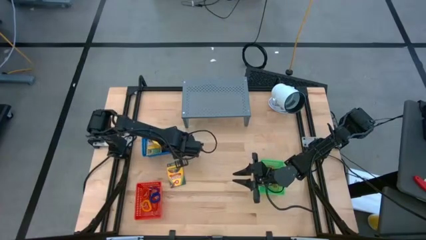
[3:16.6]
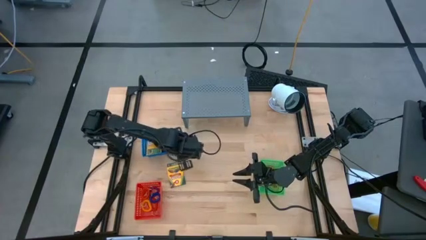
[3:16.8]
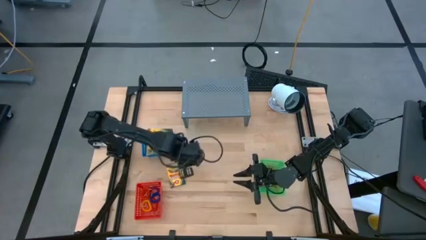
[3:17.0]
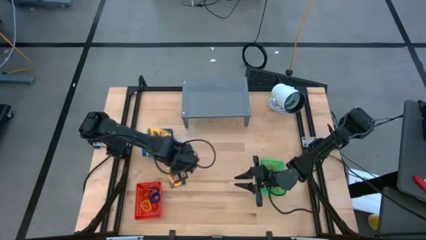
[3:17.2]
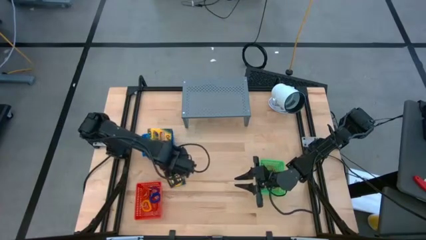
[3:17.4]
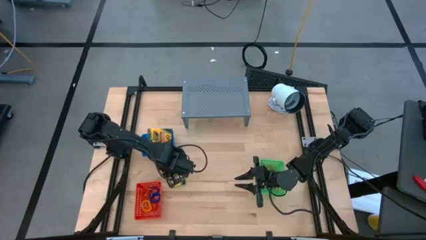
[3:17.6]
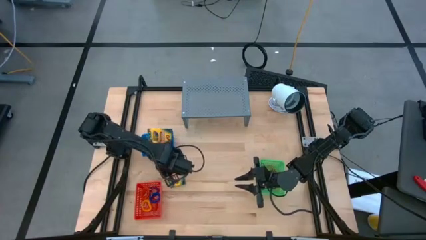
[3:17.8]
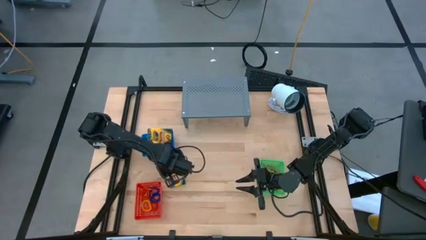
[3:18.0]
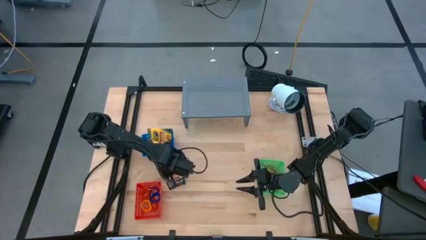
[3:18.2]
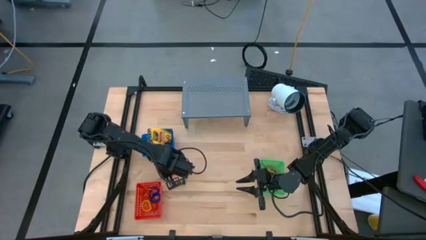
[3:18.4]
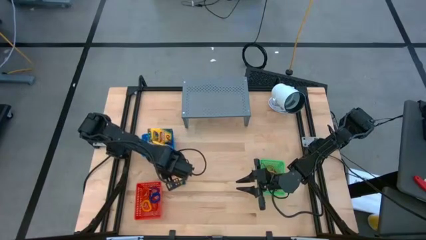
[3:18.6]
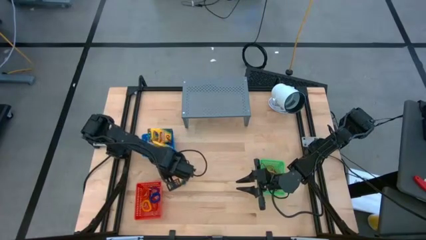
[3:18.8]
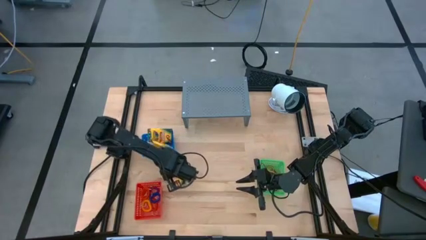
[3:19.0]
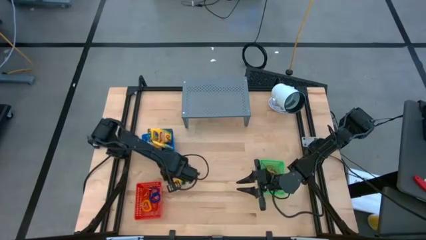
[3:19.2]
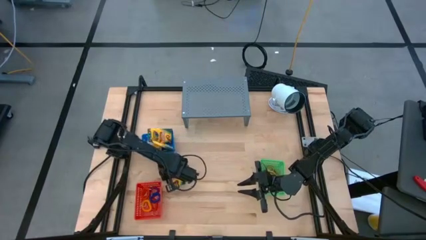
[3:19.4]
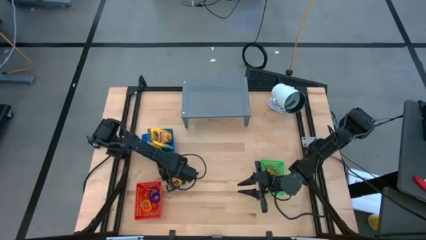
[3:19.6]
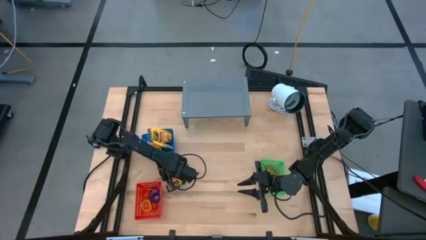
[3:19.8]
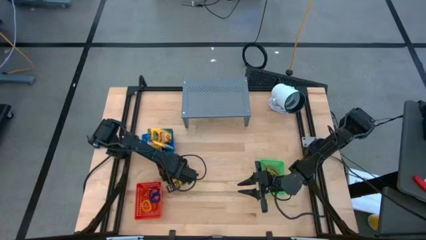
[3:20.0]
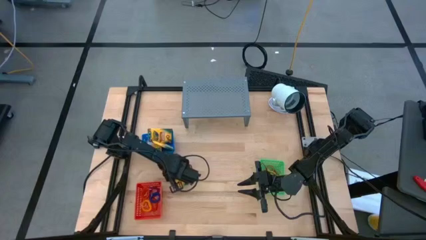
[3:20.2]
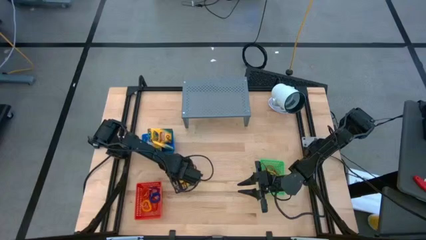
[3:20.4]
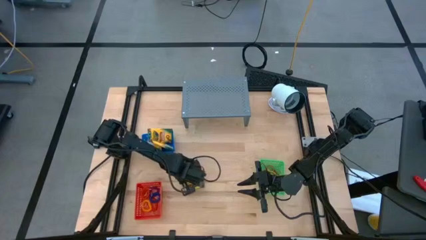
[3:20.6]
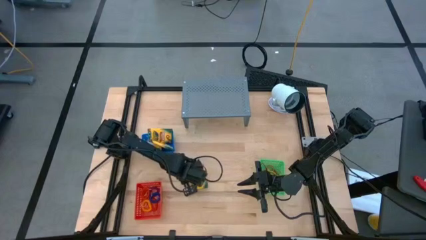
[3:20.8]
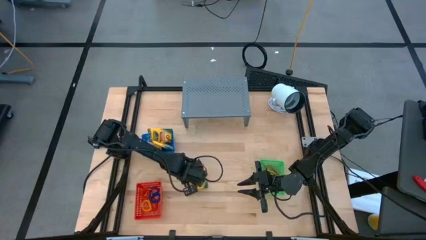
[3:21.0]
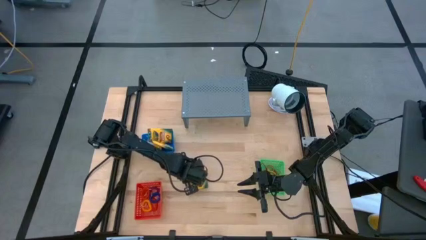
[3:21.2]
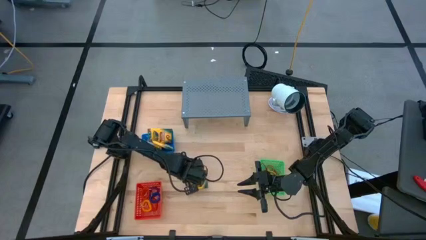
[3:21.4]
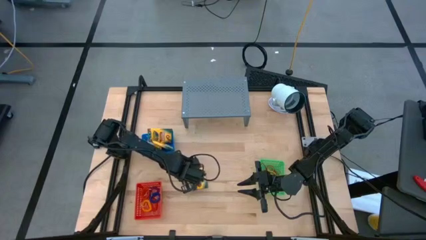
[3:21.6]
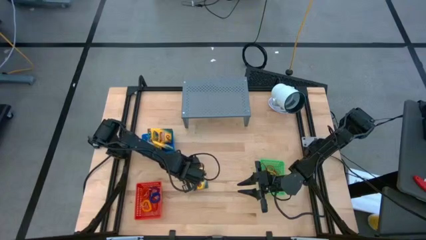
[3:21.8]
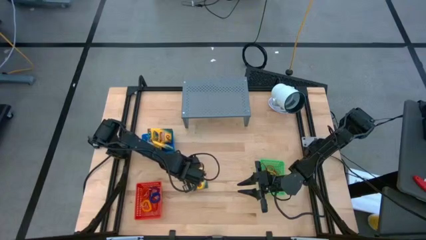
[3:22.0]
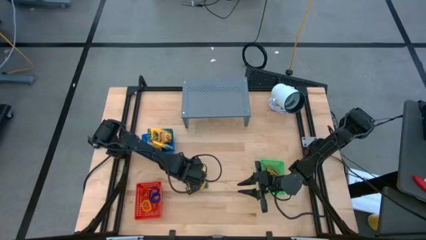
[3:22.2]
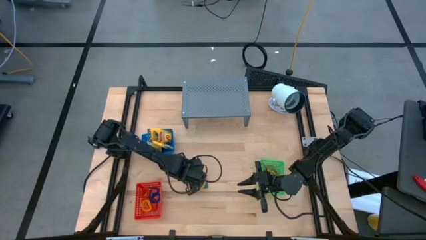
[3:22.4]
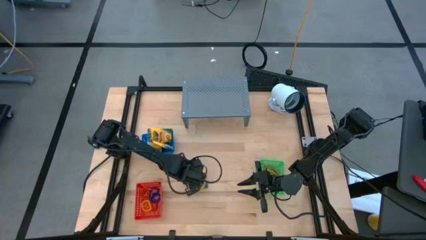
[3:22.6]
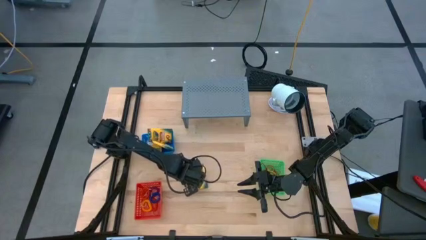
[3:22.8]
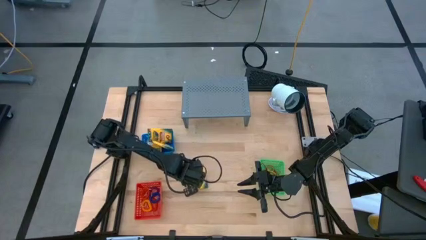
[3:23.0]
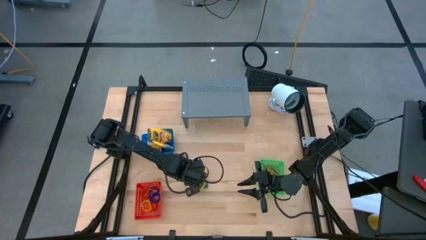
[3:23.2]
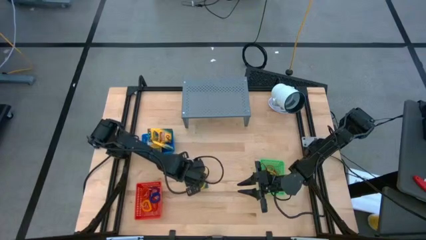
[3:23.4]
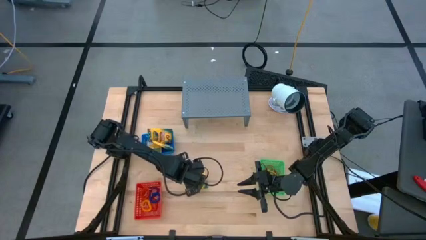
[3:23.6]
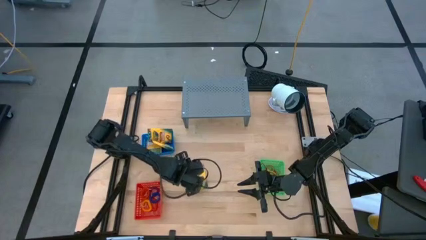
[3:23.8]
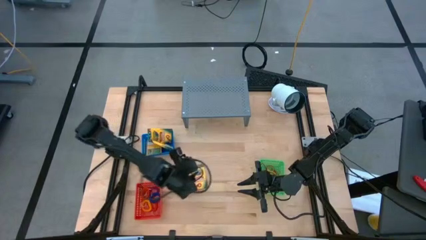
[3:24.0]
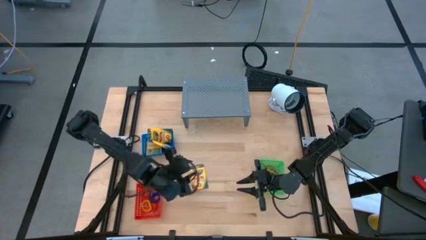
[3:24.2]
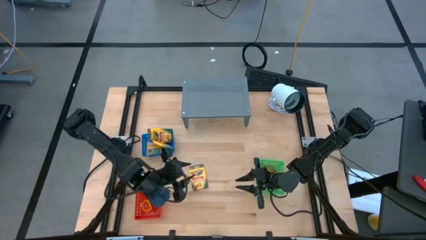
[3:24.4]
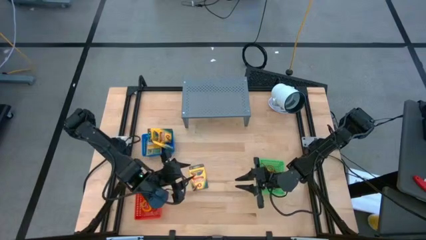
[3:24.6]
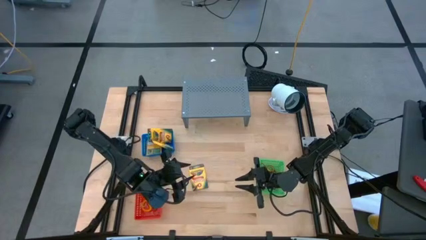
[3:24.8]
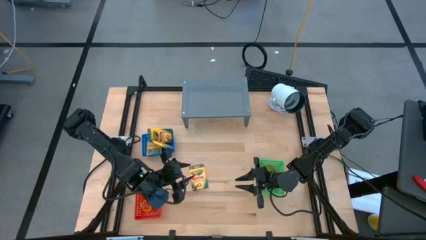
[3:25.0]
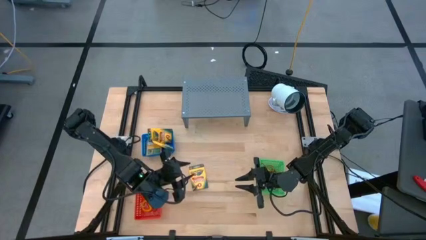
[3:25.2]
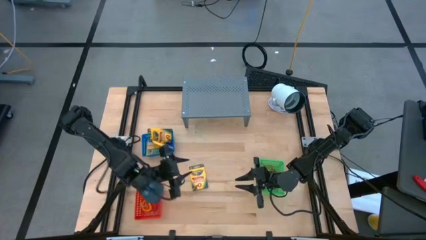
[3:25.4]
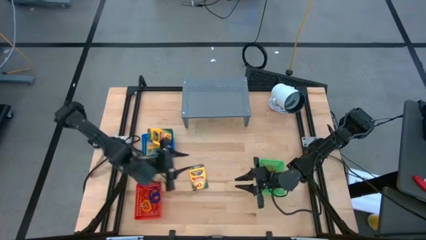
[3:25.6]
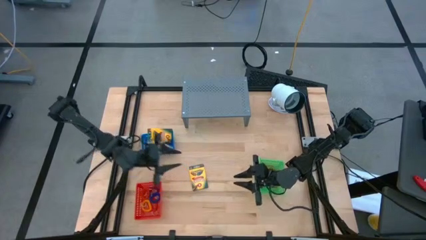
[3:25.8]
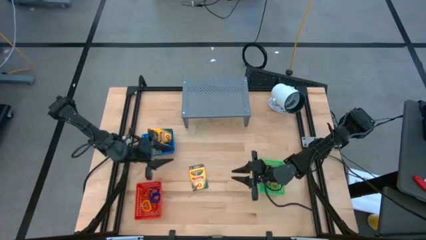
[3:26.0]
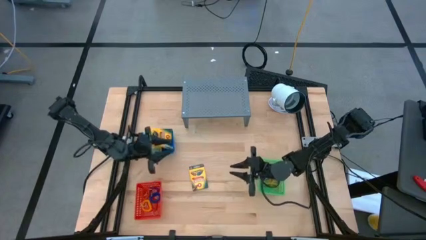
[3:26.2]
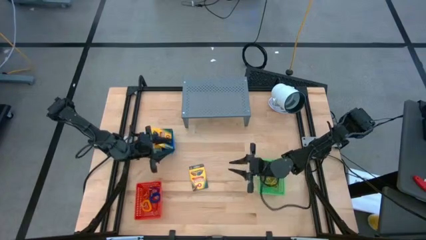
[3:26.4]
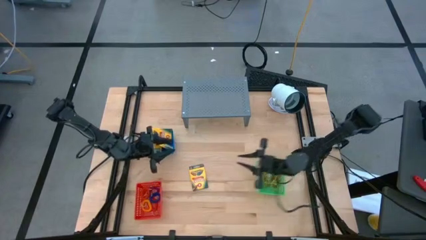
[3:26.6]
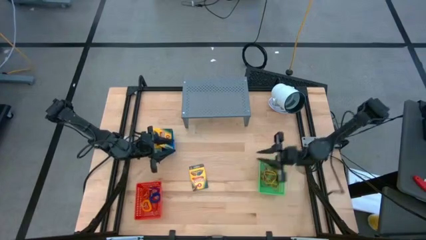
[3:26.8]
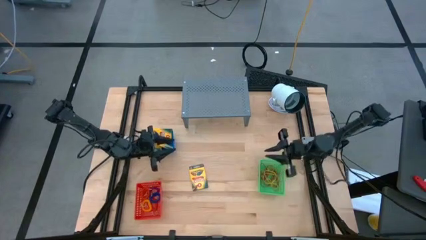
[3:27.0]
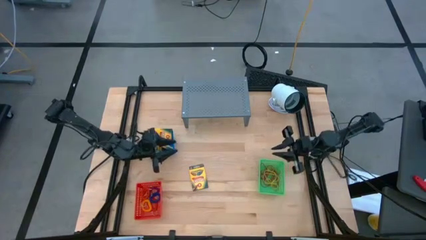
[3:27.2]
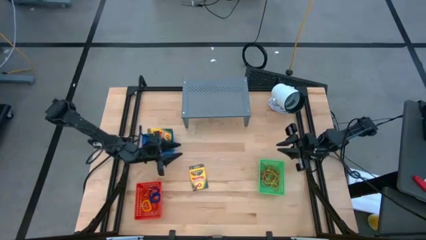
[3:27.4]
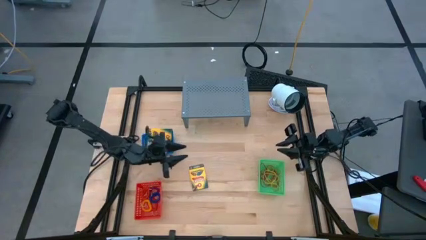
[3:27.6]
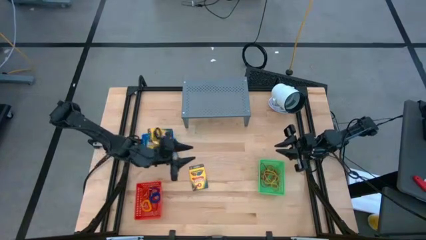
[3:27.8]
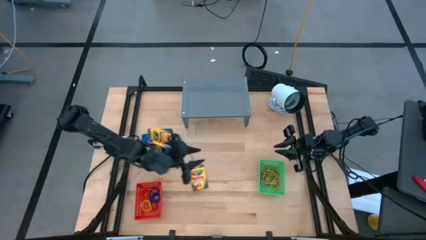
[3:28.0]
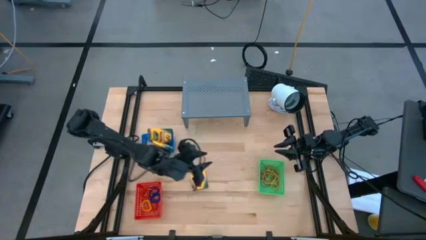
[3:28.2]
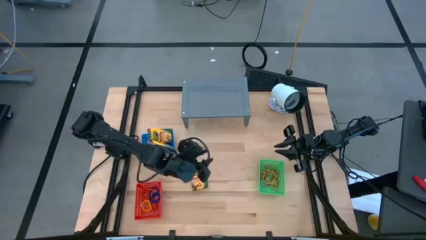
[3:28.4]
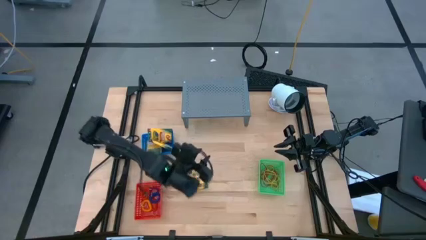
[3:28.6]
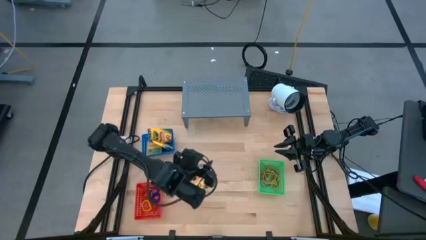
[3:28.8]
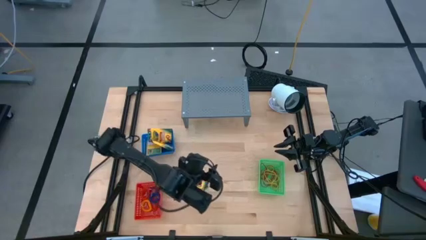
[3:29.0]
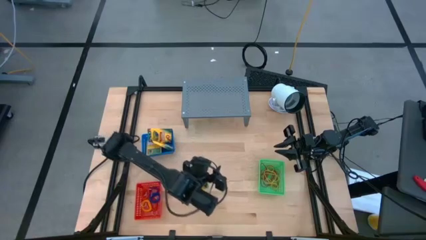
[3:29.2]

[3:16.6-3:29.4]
Task: Pick & Place Office Desk Supplies
Put the yellow crayon box into the blue bin

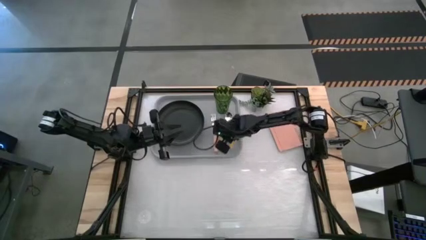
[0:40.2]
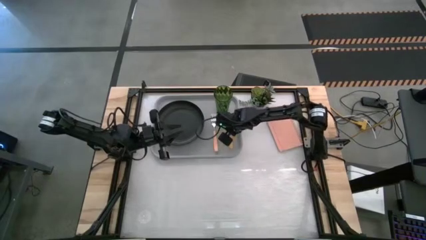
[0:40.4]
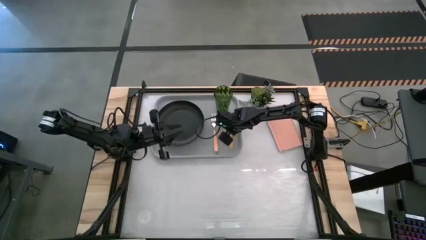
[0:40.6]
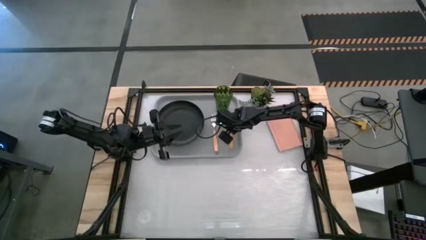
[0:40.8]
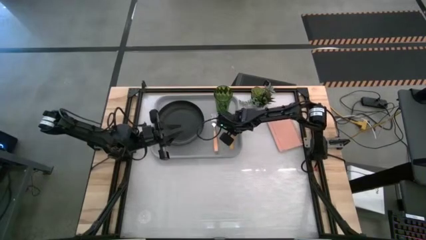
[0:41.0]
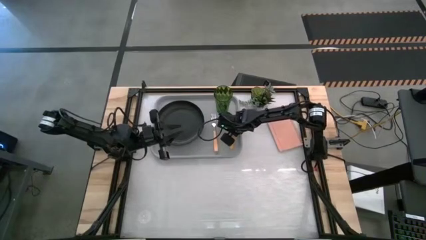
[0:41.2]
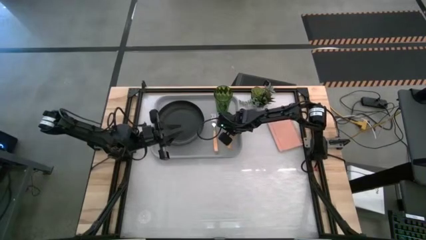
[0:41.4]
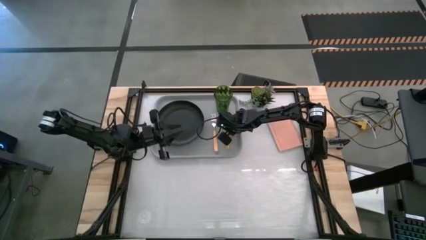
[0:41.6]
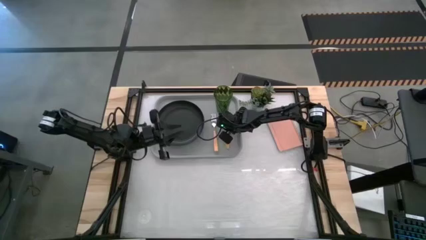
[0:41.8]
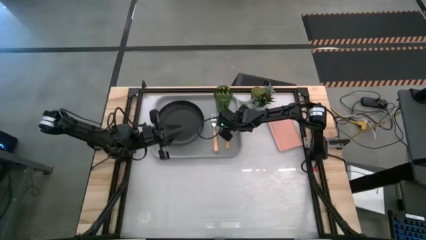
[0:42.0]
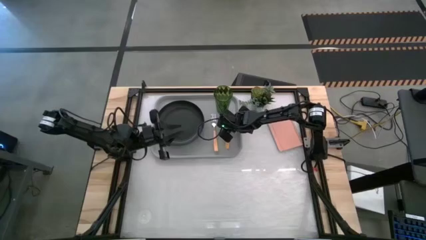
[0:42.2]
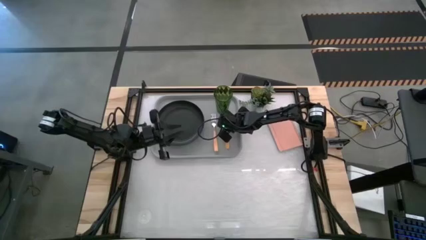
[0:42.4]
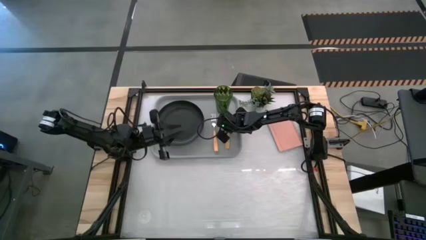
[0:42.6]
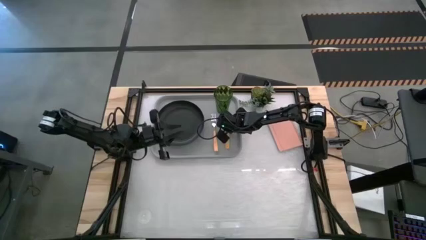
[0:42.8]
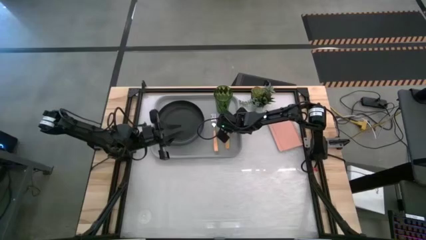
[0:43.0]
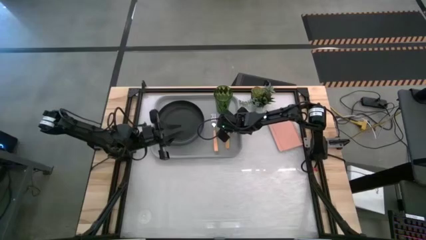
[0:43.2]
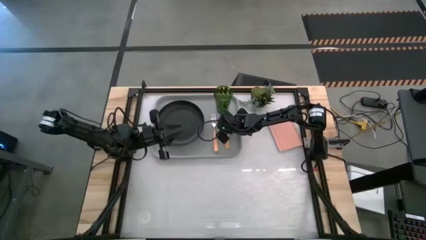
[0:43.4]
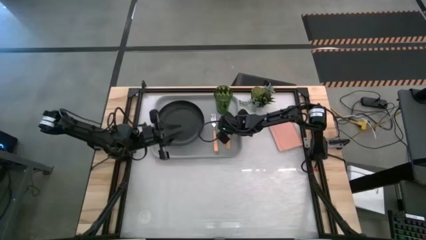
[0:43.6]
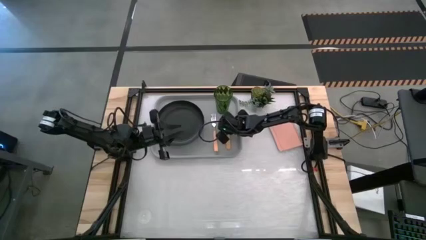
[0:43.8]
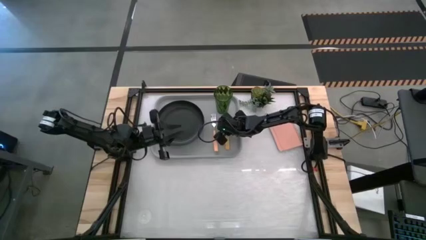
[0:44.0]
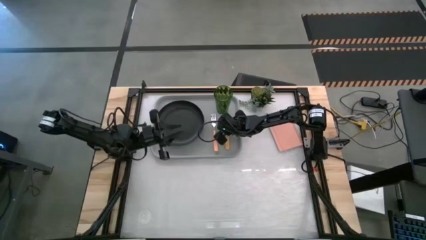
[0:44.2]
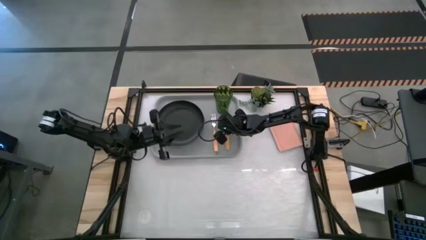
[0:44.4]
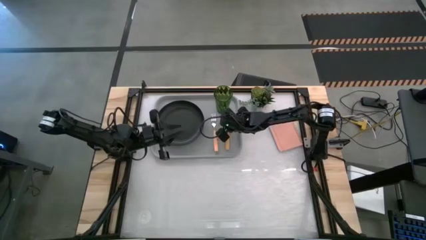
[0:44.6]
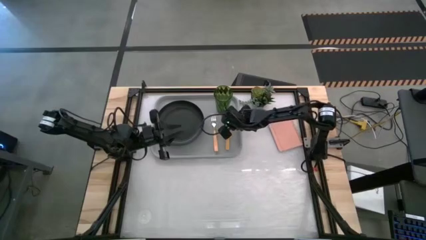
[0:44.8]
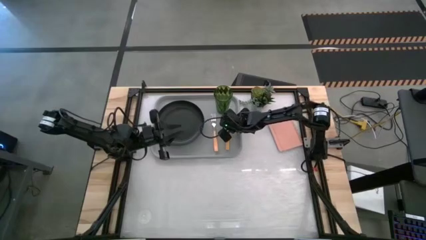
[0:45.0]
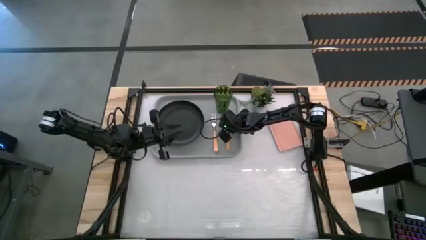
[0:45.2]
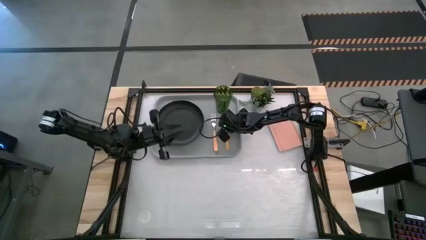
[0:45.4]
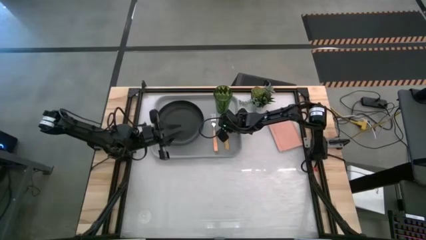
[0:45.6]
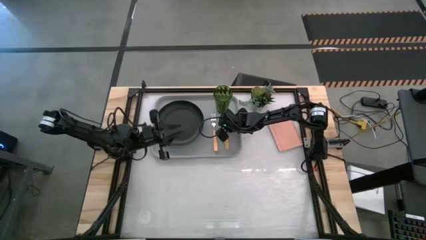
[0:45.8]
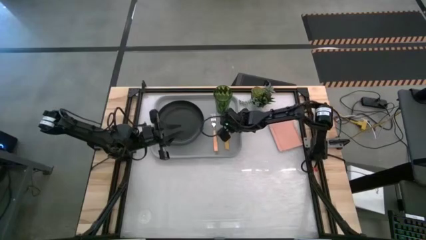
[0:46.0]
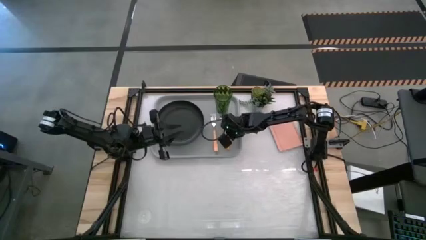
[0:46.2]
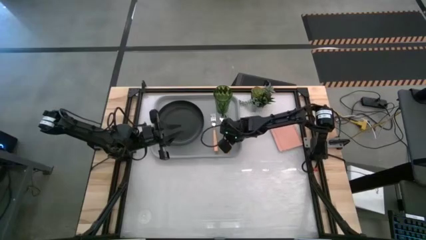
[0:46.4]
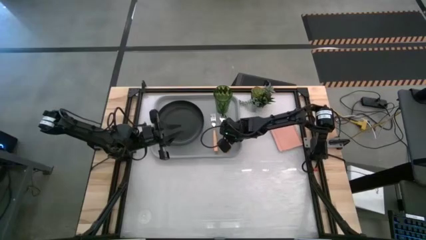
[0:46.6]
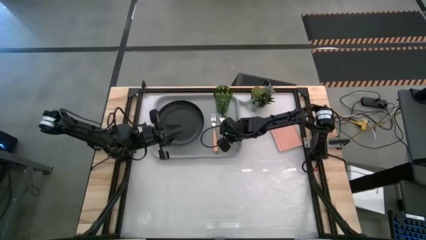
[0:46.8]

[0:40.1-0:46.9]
Task: Pick and place plate/cup/fork/spoon on tray
Adjust the brown spoon on the gray serving tray
